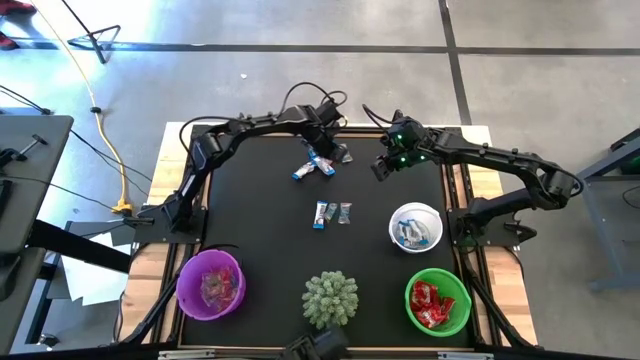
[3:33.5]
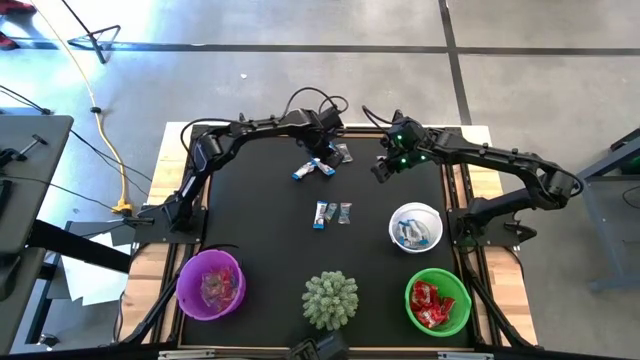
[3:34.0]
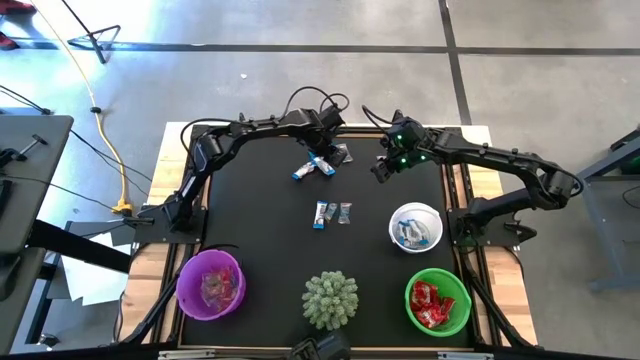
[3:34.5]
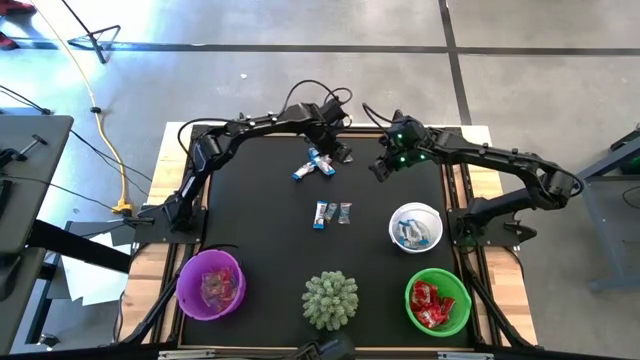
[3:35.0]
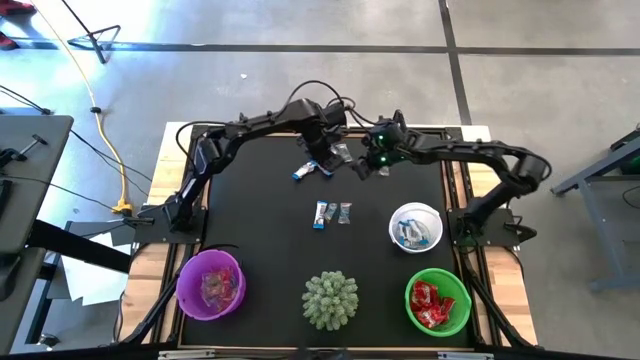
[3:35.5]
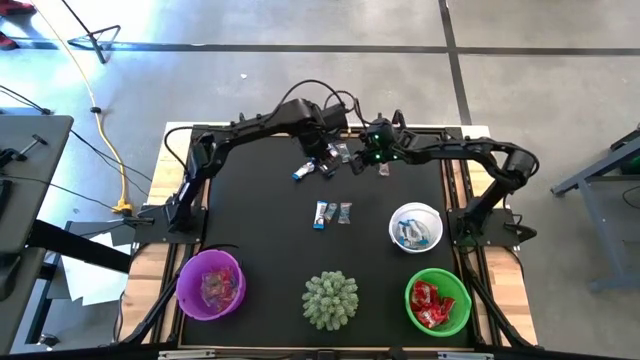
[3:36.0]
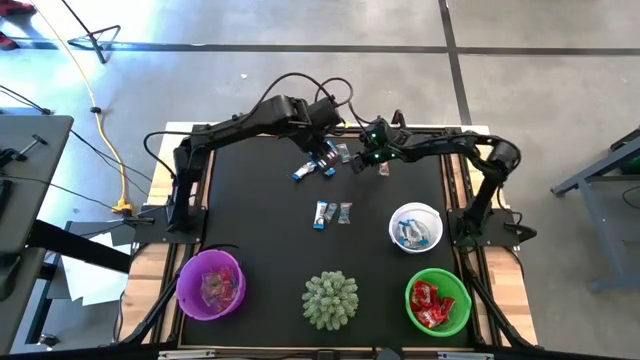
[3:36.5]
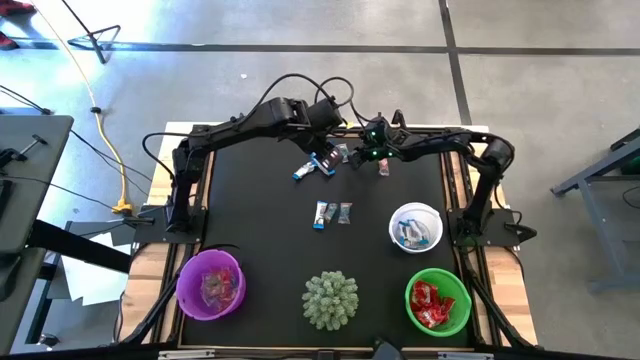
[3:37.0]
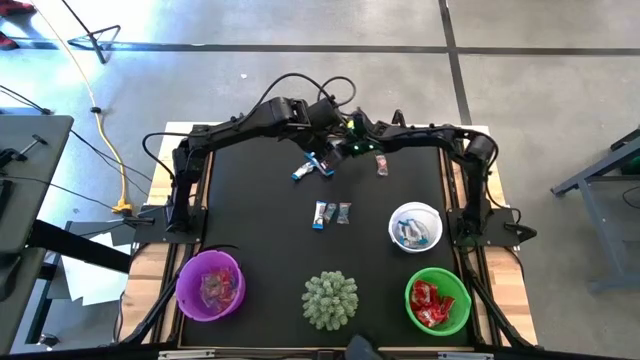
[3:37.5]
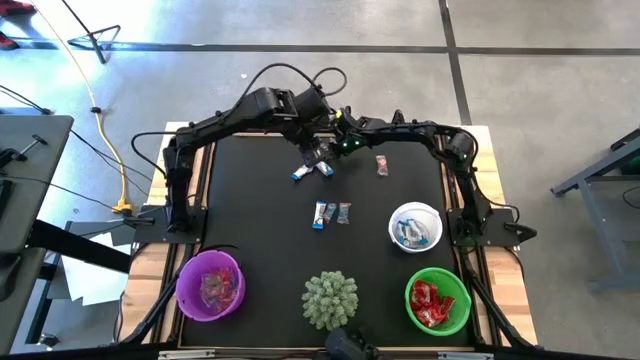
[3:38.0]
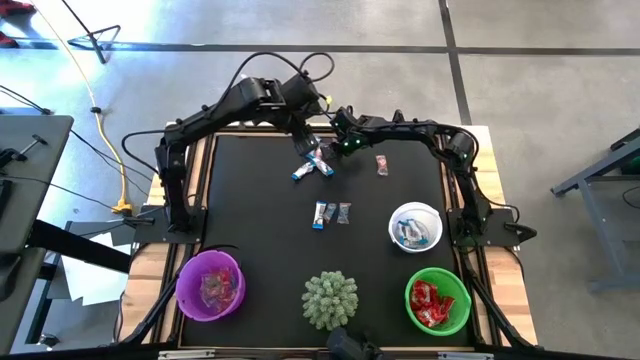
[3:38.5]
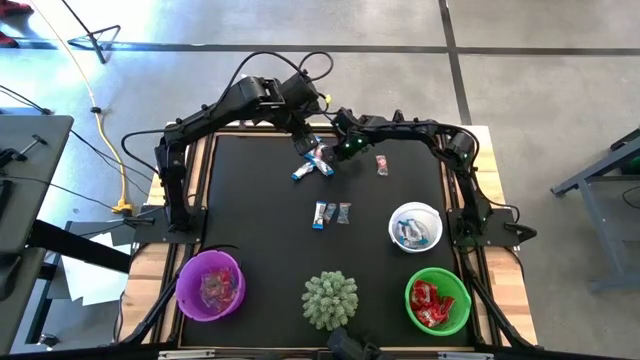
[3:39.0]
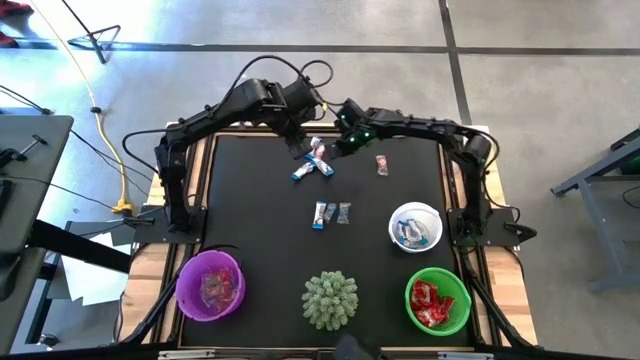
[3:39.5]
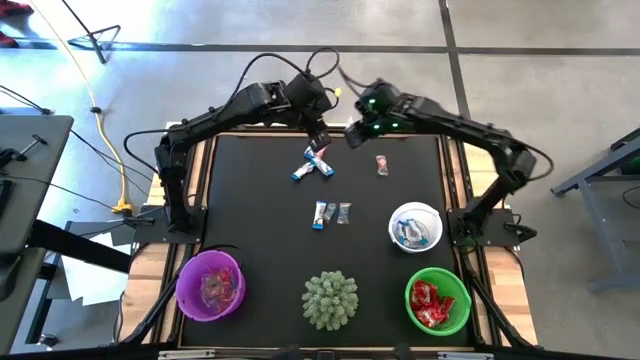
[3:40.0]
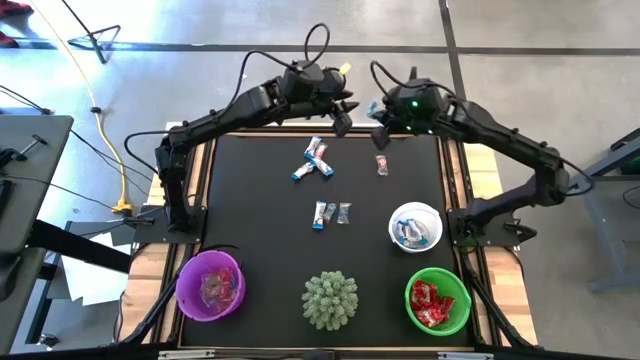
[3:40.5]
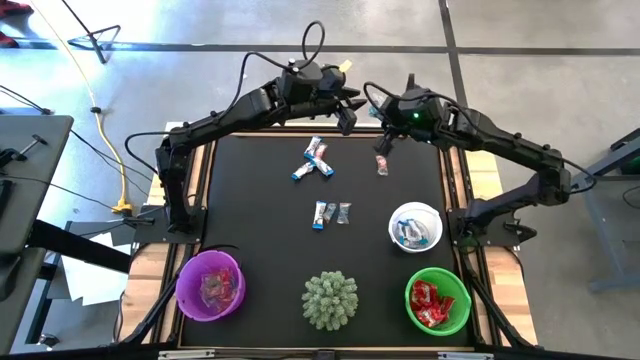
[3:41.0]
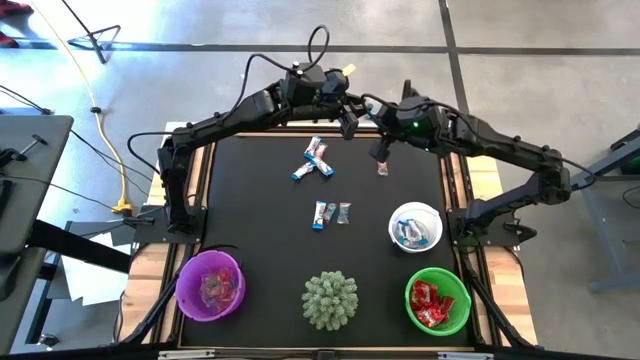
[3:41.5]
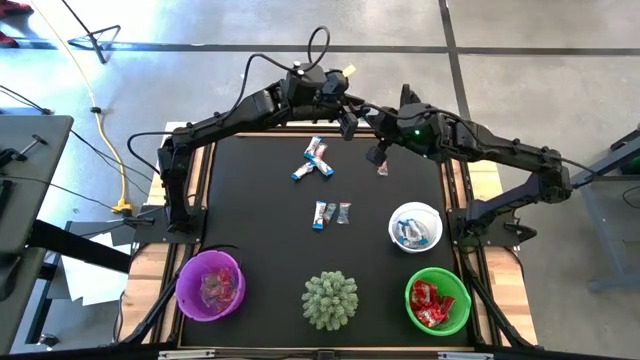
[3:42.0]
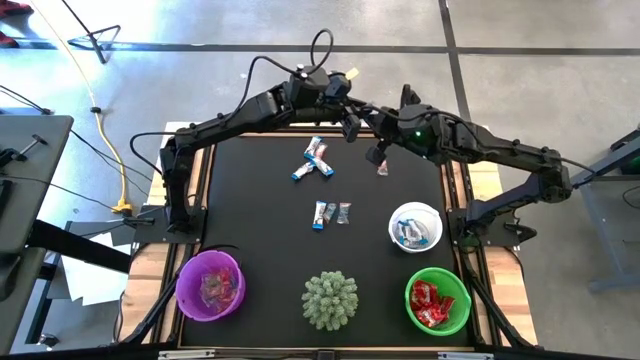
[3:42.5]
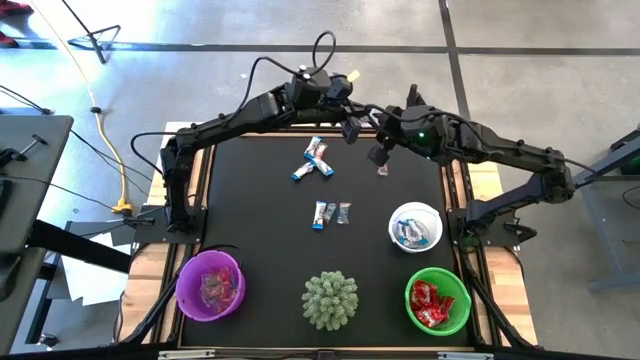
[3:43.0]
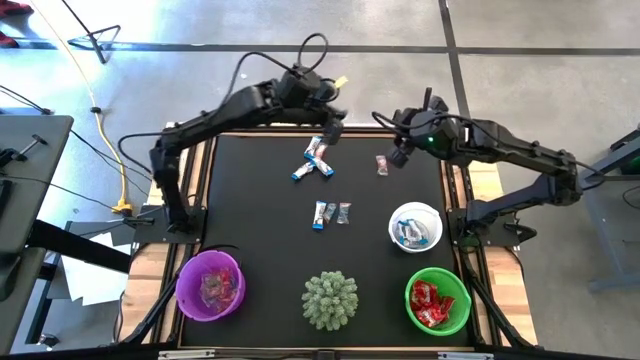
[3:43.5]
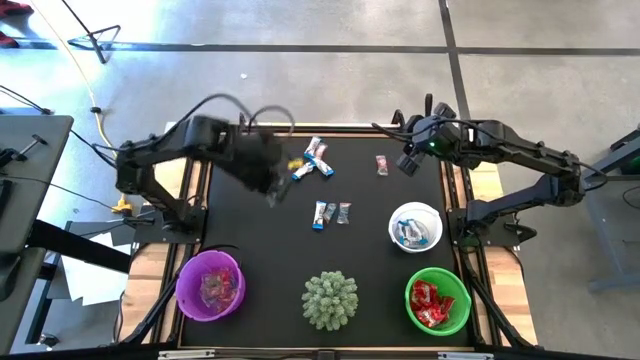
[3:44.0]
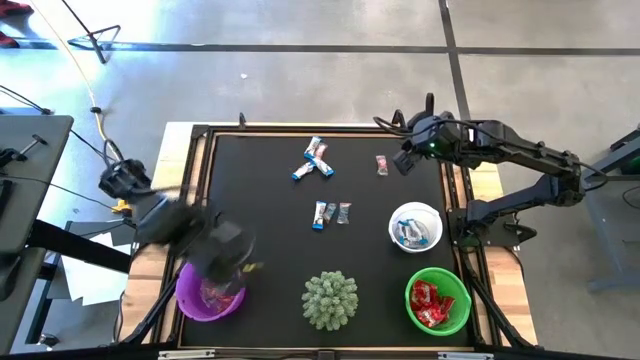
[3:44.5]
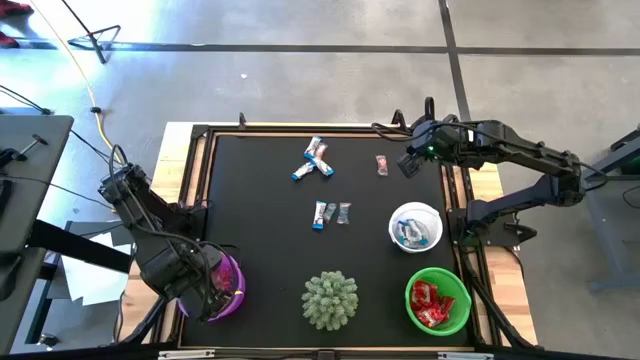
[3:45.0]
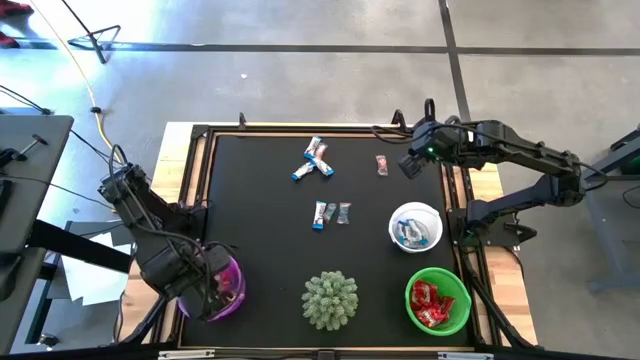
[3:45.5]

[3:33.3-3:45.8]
Task: Sort candy
Put the transparent candy wrapper into the purple bucket

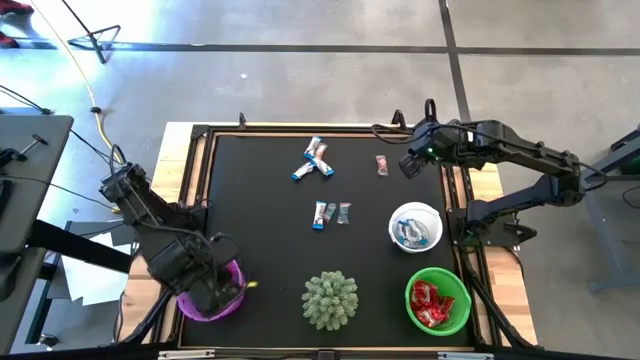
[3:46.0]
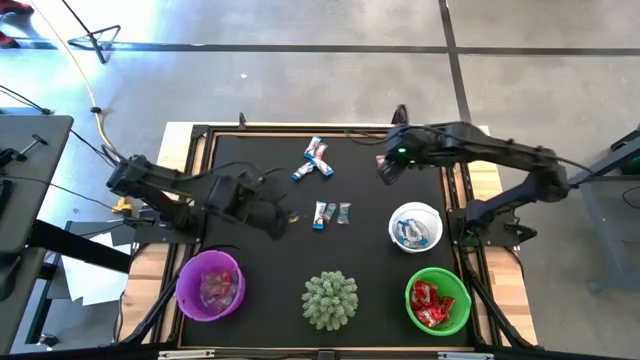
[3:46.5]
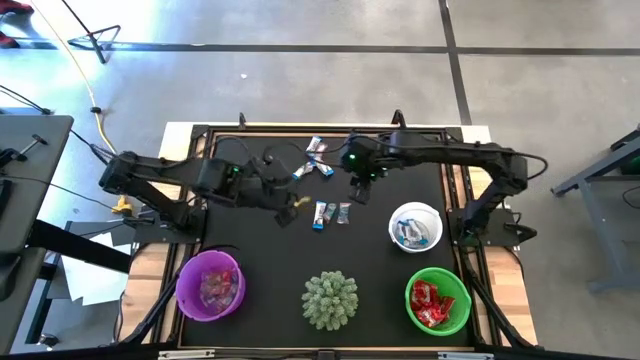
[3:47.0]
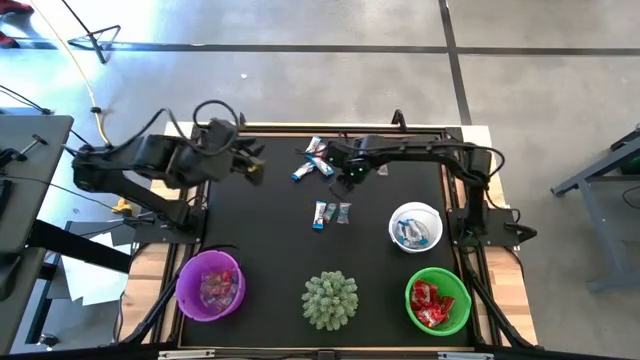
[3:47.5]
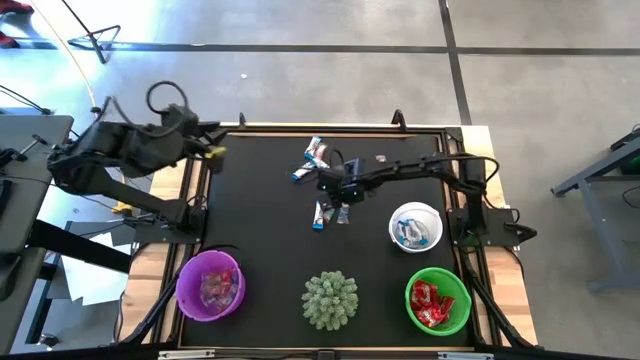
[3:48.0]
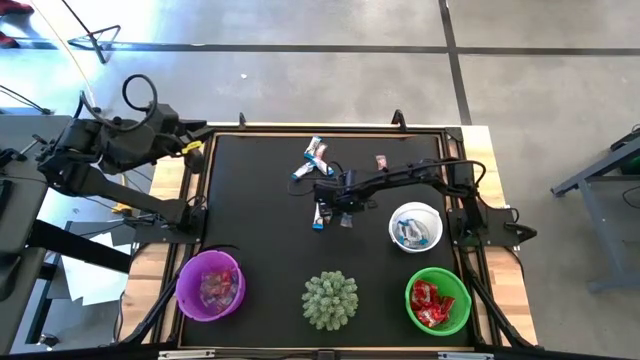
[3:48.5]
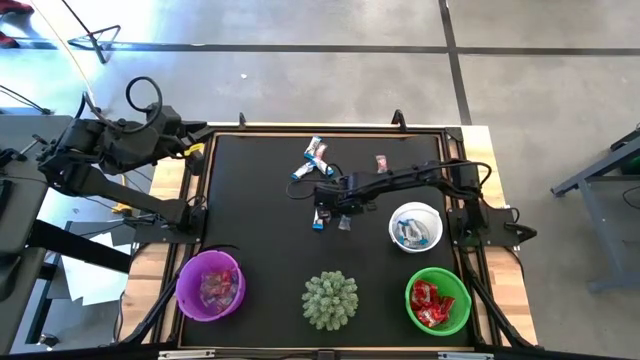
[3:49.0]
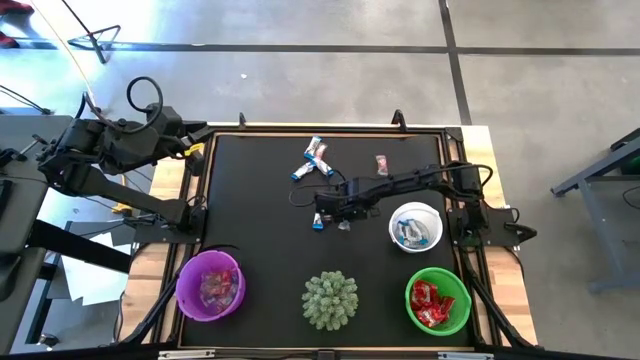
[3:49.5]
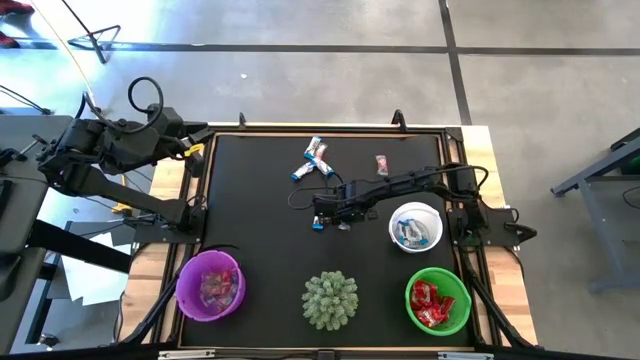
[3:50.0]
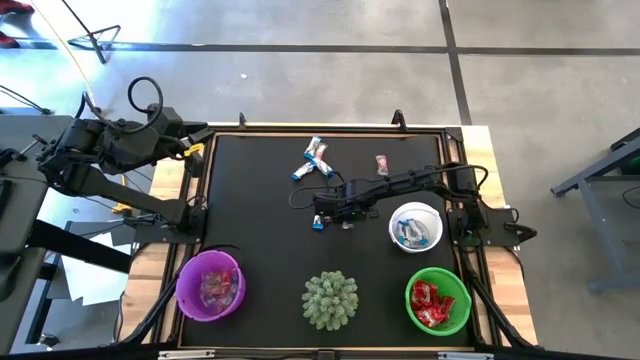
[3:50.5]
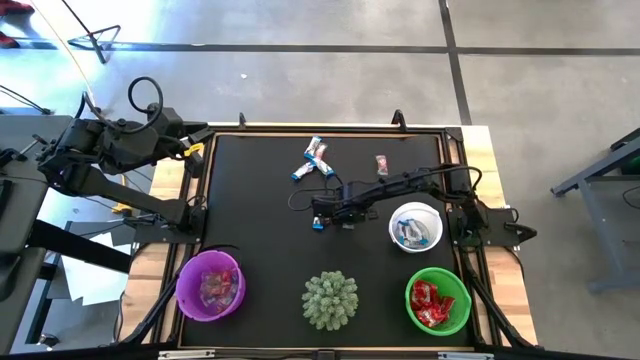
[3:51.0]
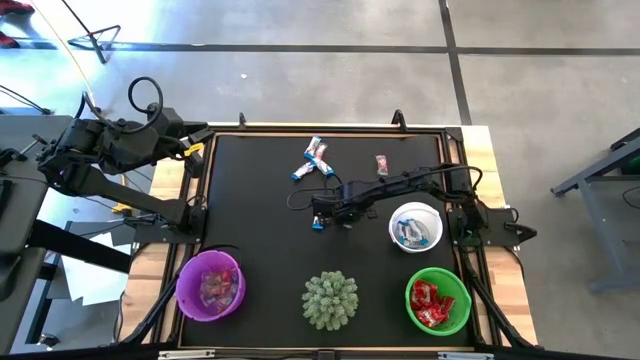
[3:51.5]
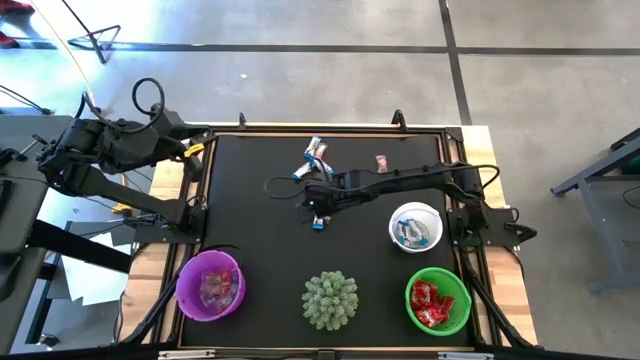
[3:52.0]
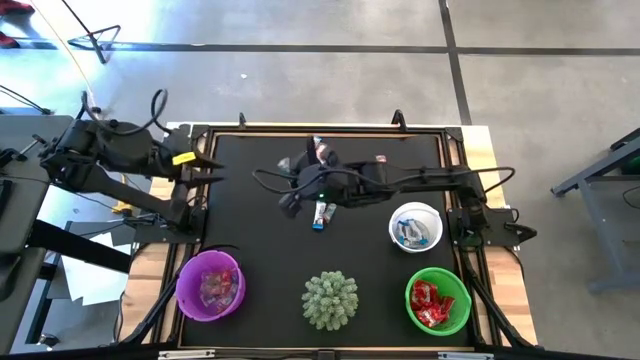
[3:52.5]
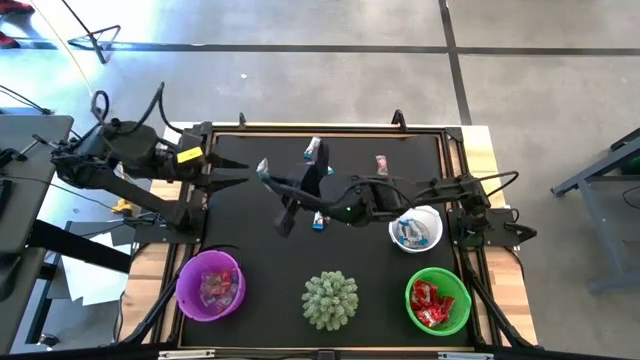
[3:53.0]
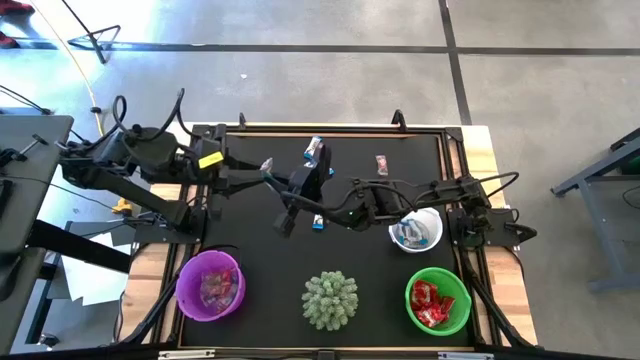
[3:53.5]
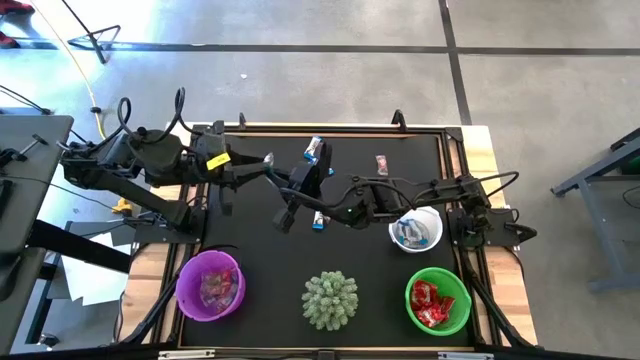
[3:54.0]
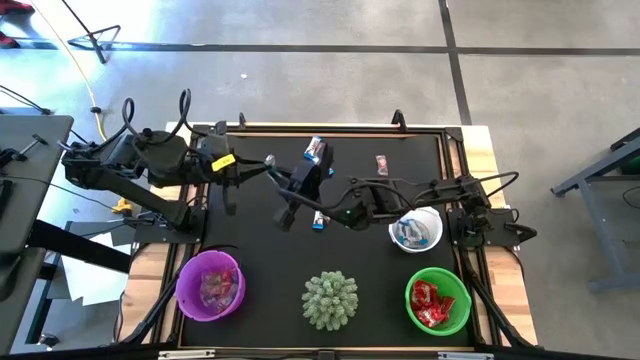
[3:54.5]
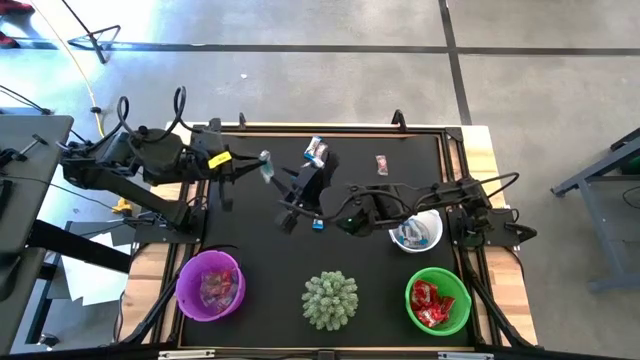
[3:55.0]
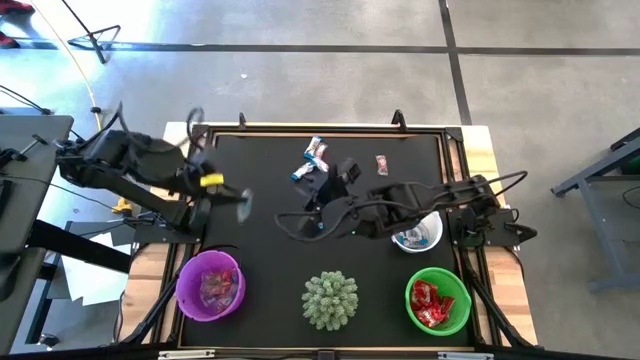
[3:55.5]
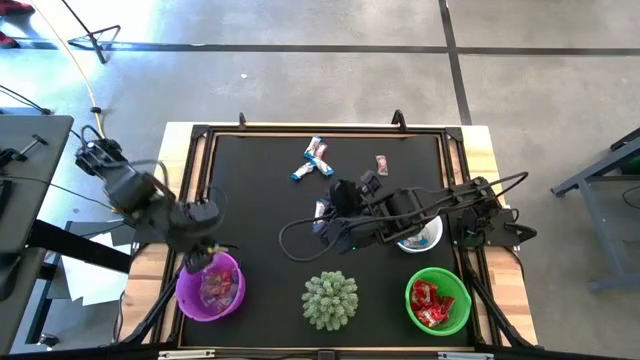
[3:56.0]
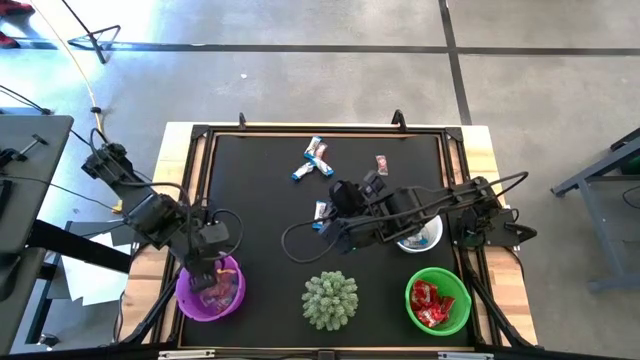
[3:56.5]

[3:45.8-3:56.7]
Put the transparent candy wrapper into the purple bucket
